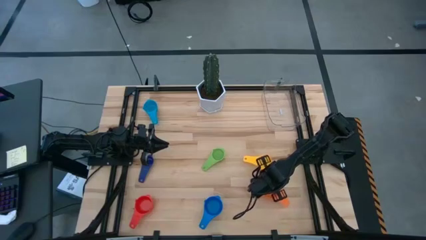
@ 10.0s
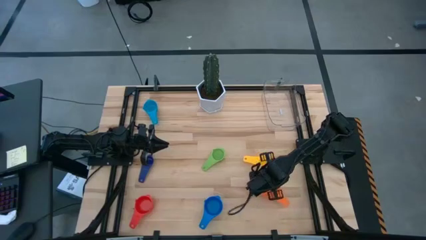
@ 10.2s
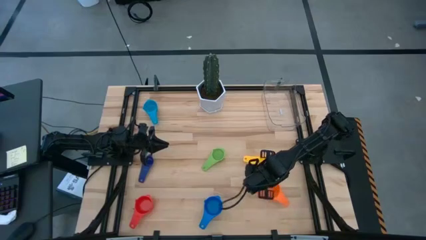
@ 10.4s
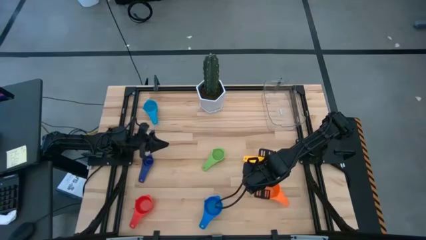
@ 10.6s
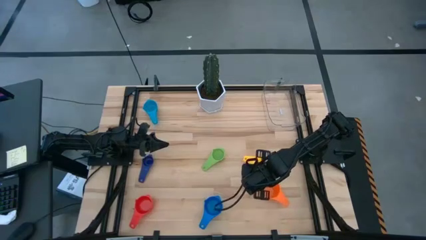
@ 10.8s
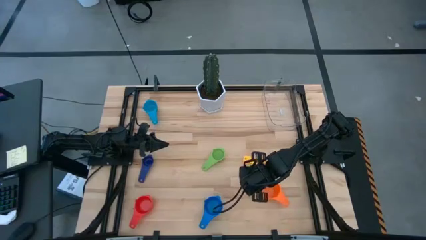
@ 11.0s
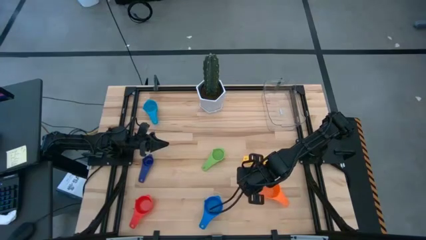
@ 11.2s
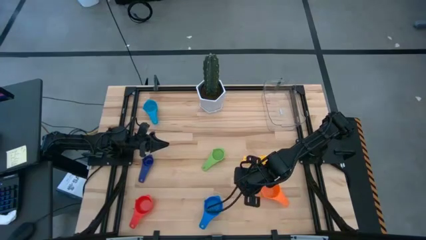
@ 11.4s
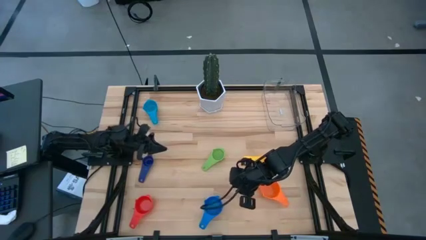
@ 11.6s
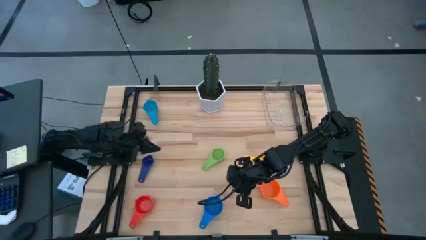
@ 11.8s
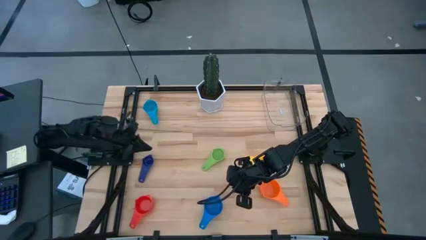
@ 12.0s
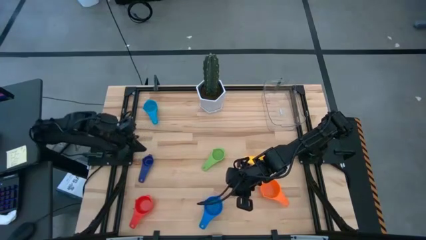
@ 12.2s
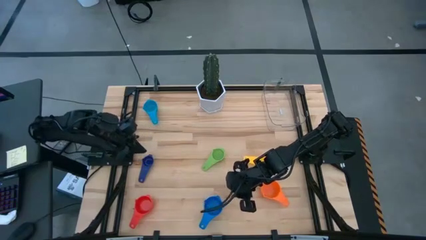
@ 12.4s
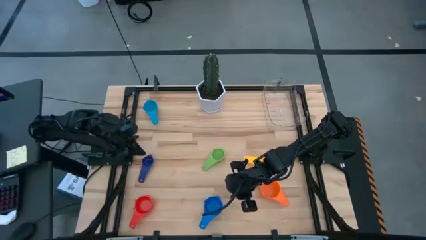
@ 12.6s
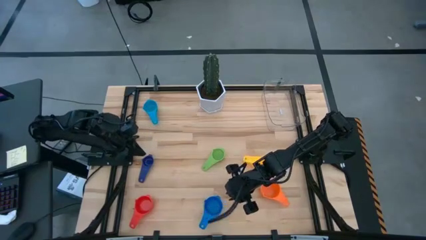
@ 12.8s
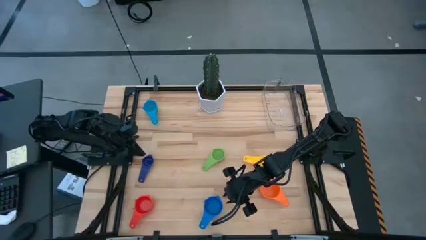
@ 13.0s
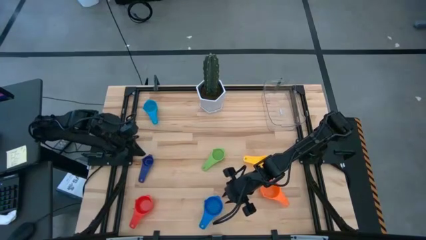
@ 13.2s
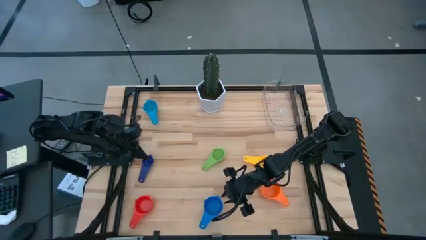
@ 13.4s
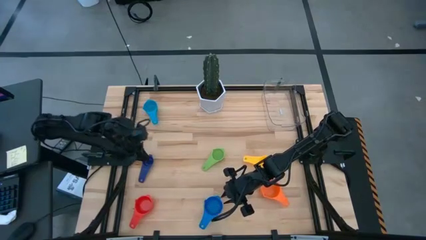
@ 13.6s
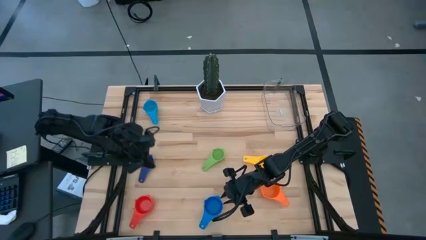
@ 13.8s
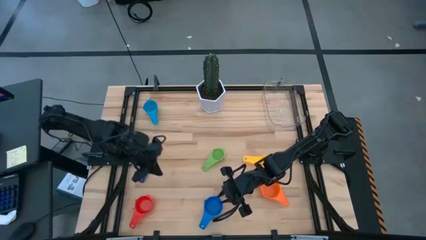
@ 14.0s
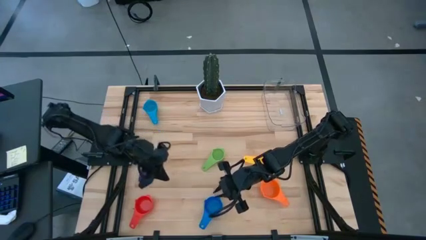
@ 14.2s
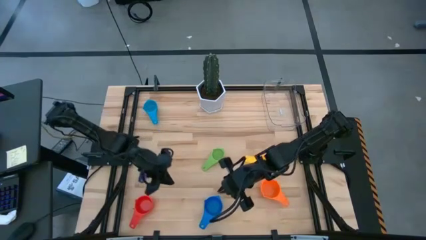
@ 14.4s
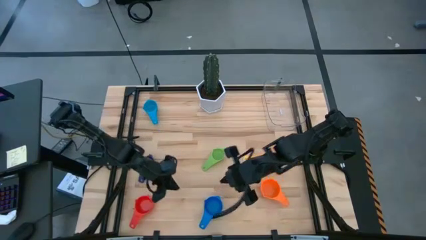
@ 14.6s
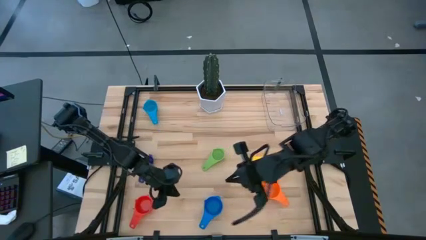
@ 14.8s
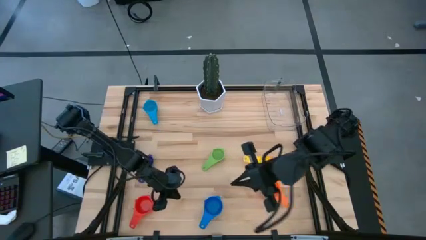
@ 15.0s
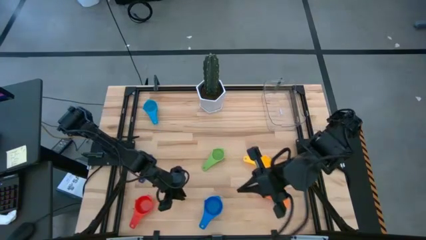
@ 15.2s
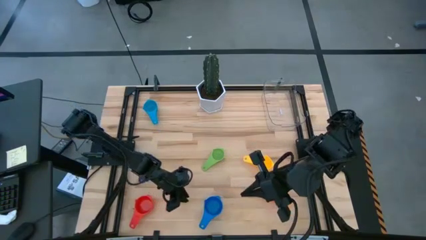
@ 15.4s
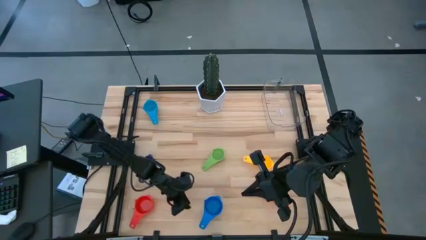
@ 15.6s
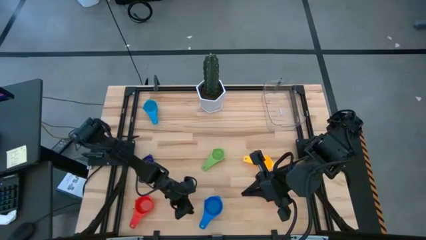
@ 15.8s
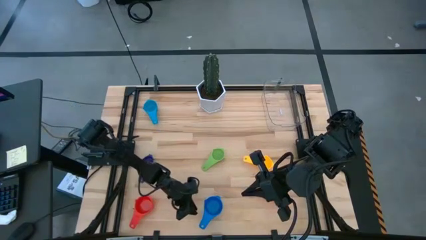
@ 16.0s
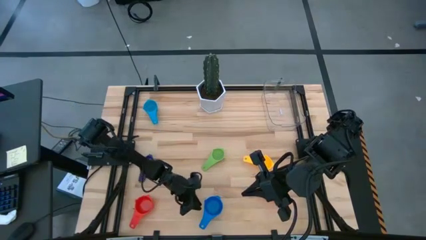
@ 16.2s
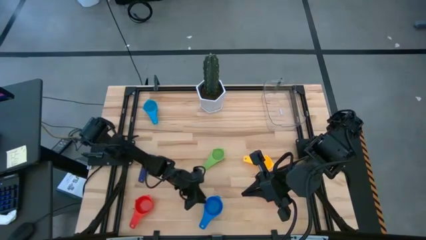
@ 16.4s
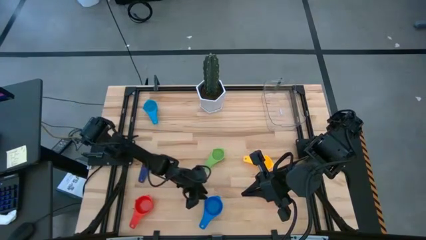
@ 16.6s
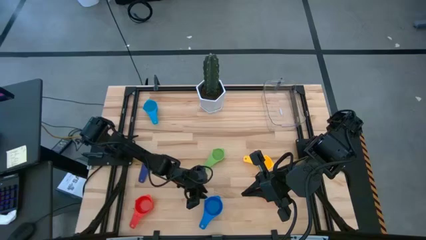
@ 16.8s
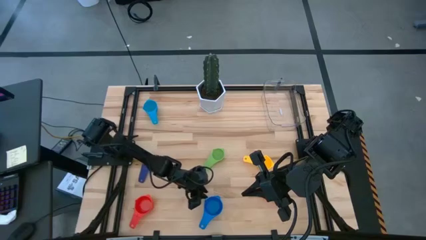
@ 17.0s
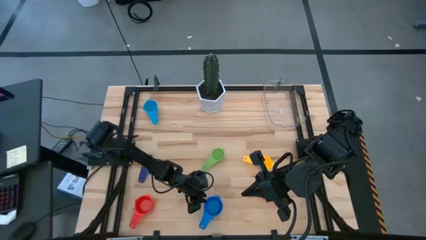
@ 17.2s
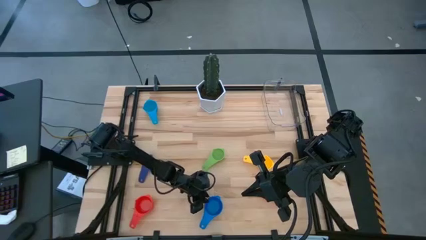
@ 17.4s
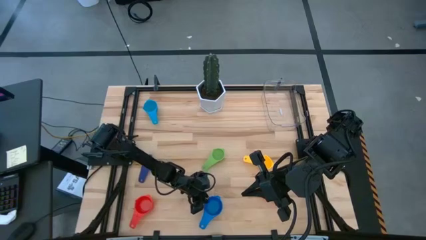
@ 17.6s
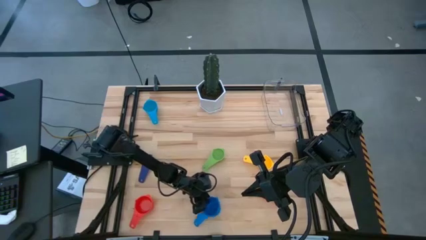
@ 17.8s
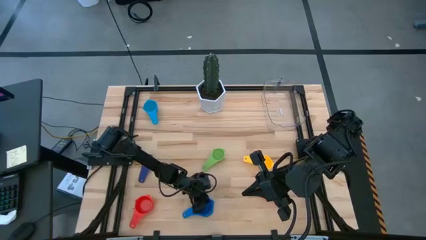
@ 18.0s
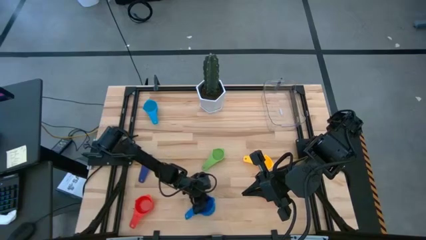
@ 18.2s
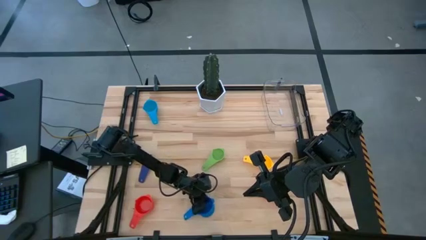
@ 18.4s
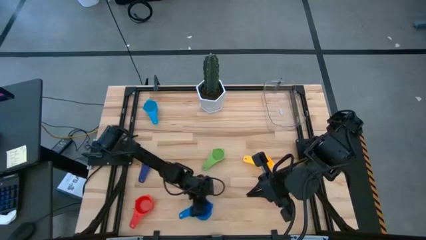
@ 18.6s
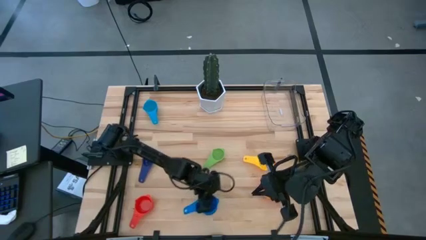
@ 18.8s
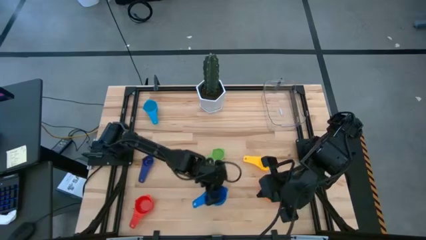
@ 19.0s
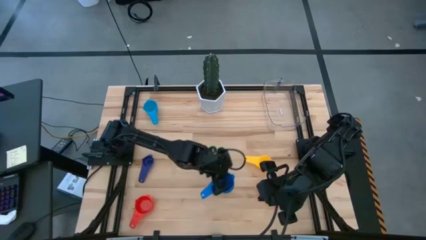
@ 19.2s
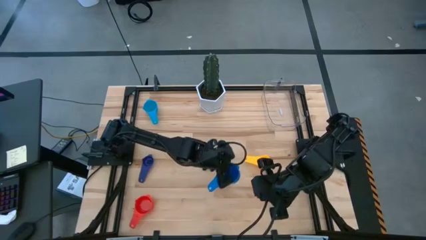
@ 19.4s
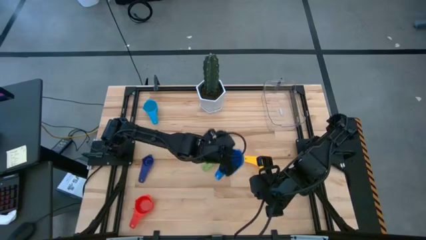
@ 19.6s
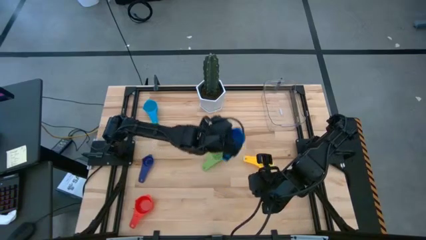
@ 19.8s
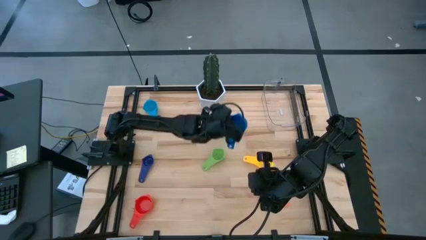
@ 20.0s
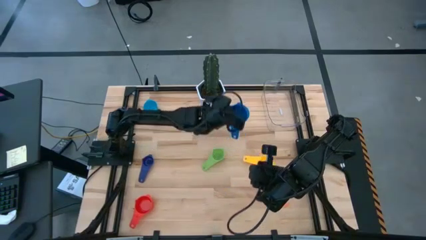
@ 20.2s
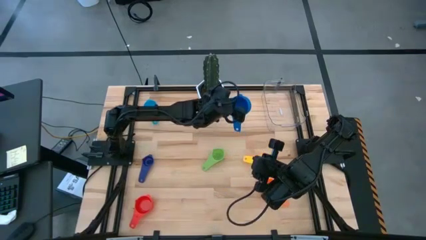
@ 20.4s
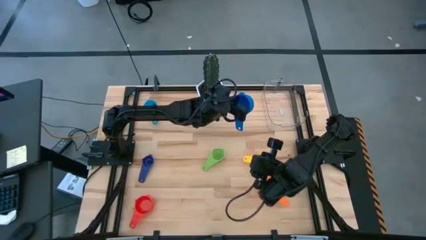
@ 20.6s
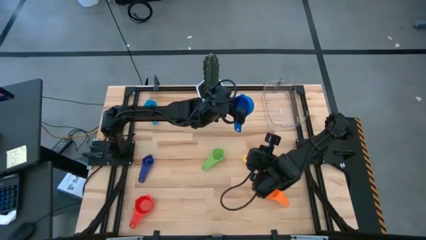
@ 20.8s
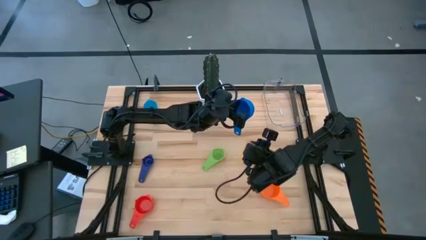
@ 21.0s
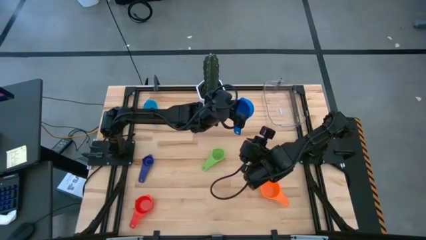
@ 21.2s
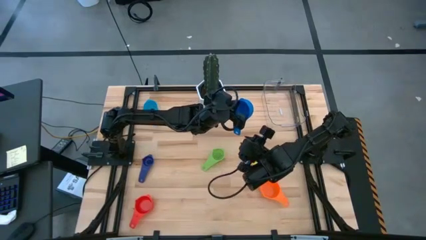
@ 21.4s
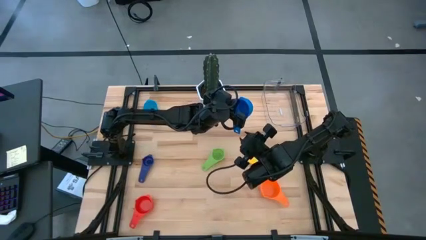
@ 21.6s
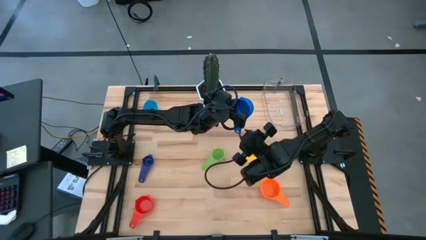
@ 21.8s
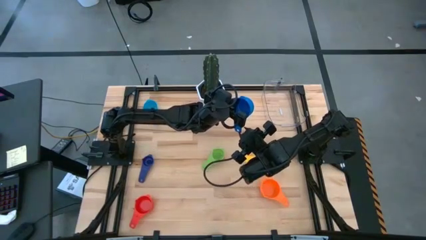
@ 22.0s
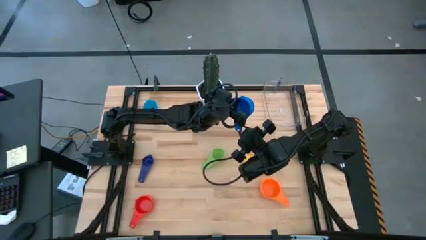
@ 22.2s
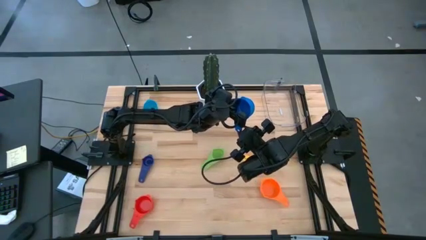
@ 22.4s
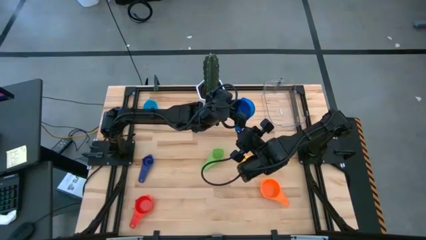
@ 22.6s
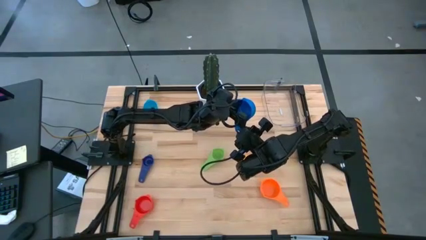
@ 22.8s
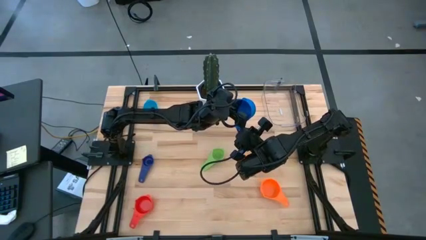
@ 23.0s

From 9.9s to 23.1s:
Task: Nest measuring cups in basket
Stack the blue measuring cup on top of the orange measuring cup
